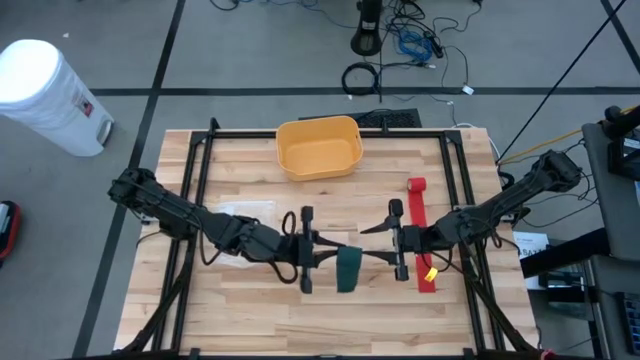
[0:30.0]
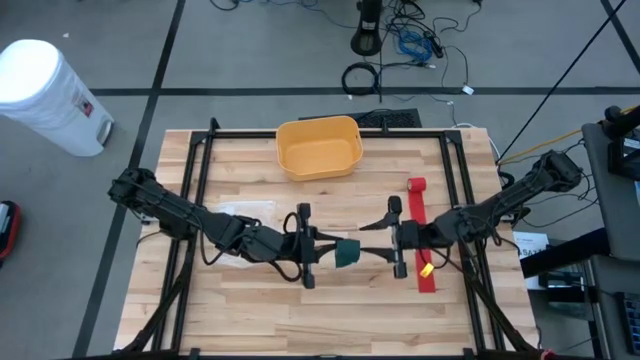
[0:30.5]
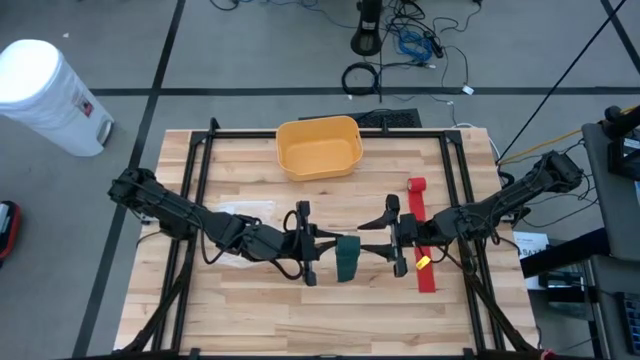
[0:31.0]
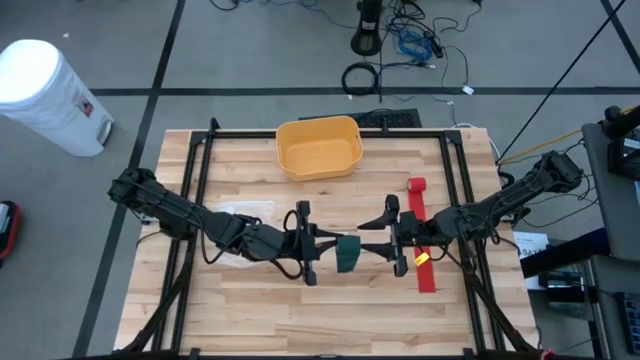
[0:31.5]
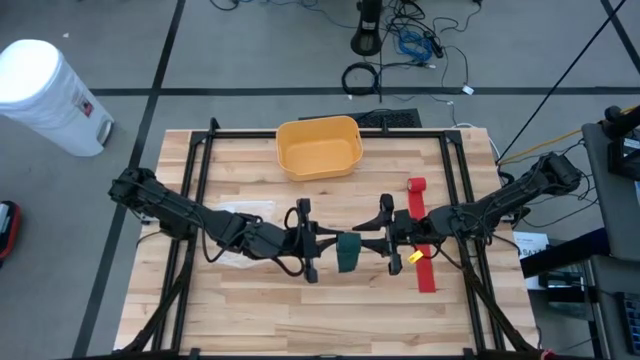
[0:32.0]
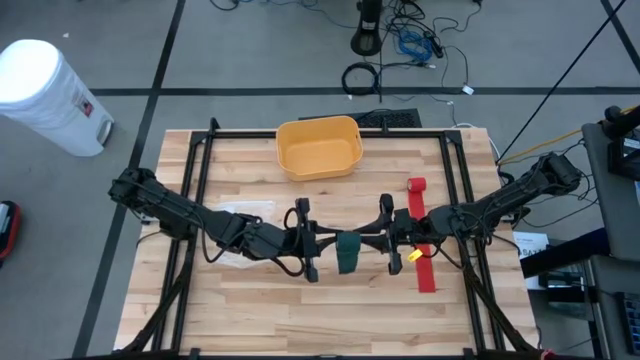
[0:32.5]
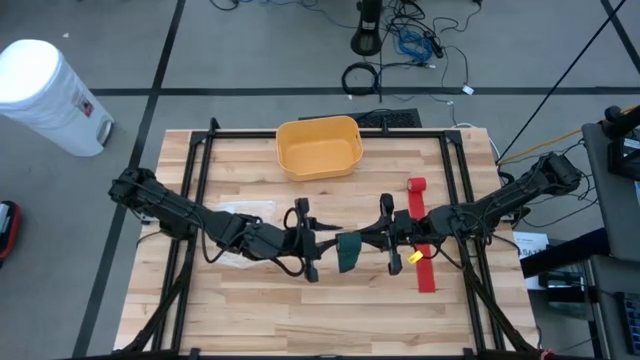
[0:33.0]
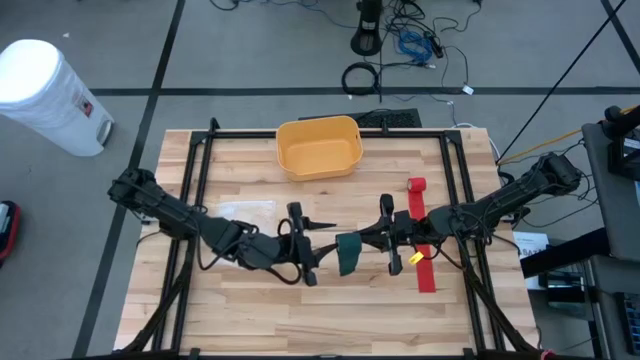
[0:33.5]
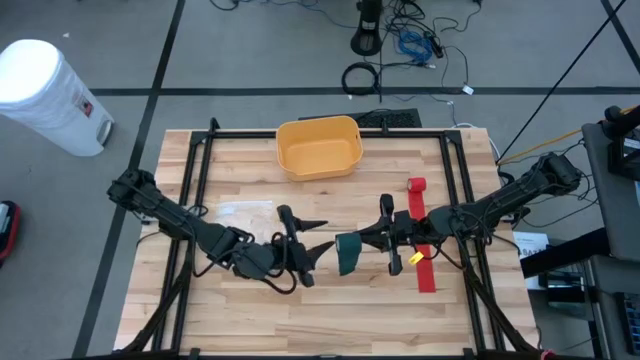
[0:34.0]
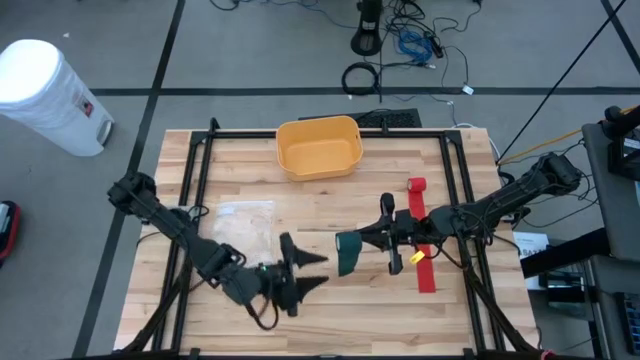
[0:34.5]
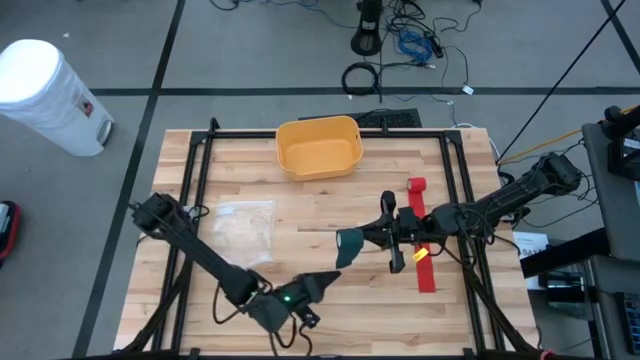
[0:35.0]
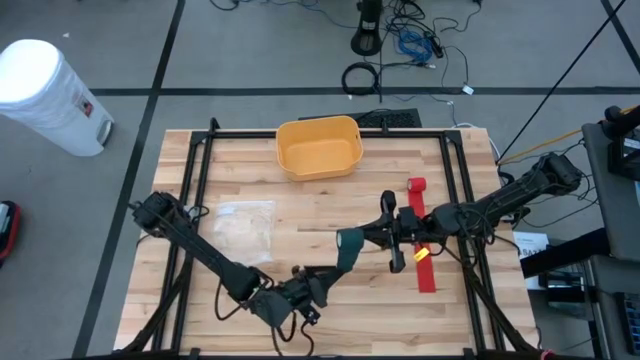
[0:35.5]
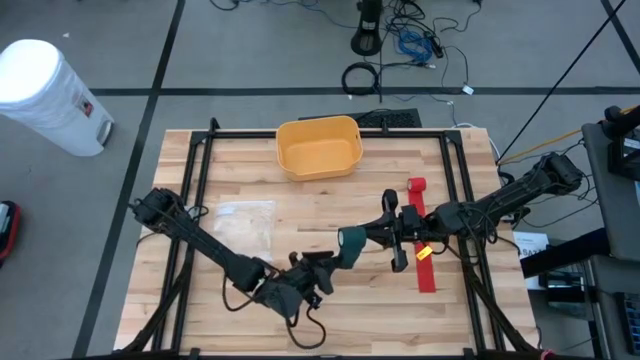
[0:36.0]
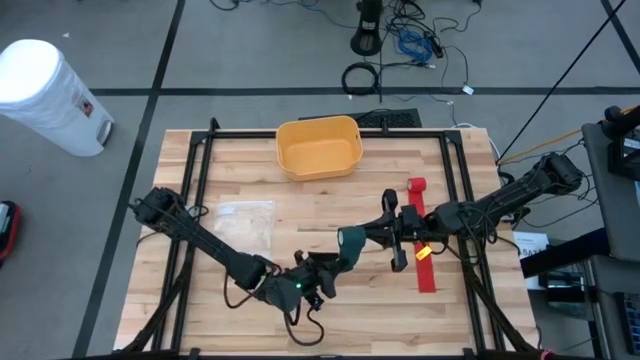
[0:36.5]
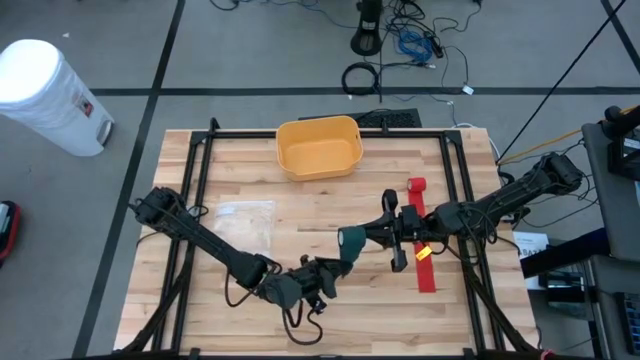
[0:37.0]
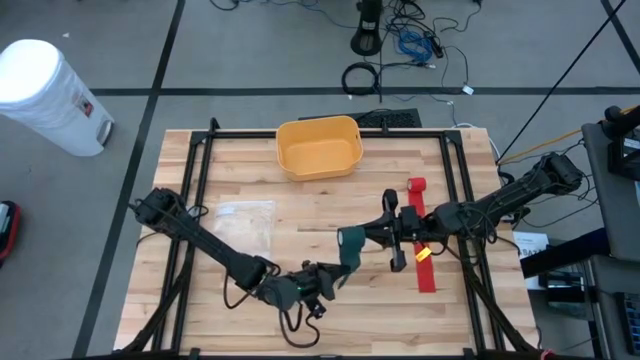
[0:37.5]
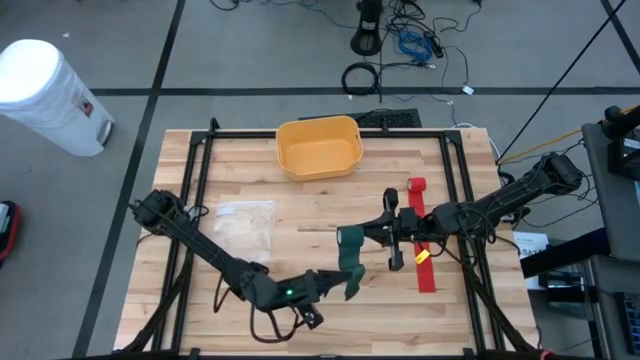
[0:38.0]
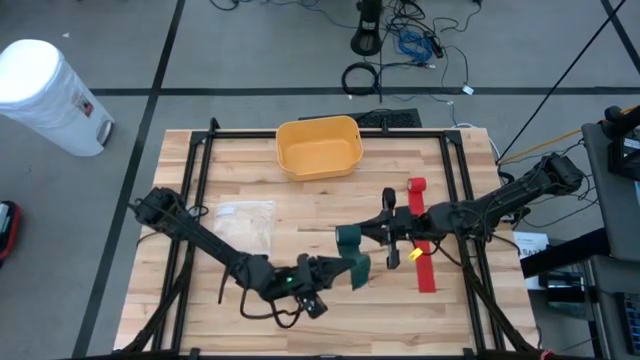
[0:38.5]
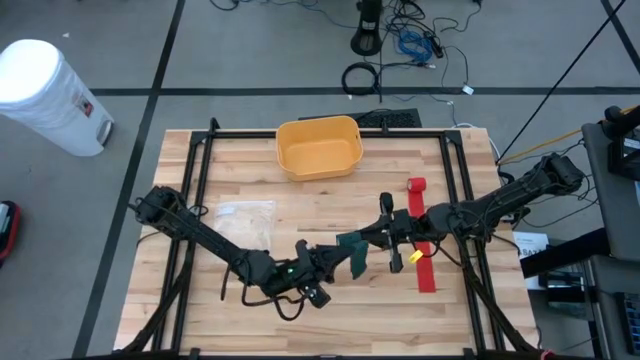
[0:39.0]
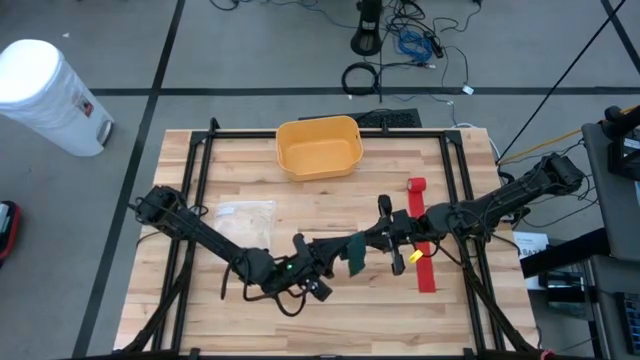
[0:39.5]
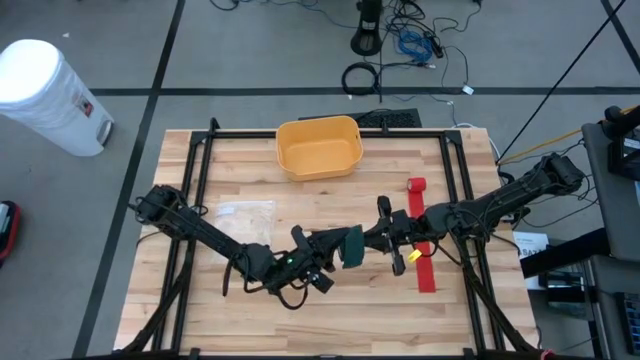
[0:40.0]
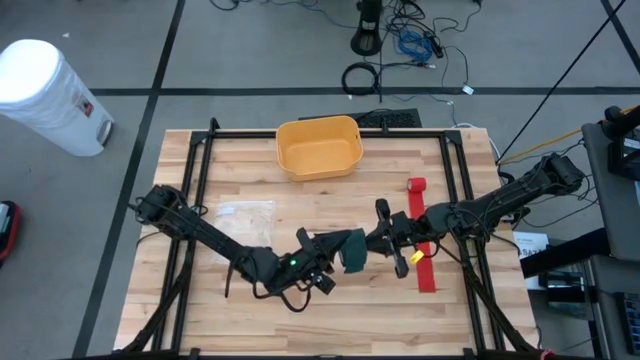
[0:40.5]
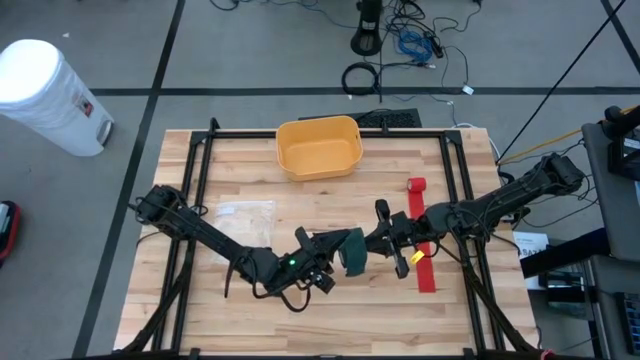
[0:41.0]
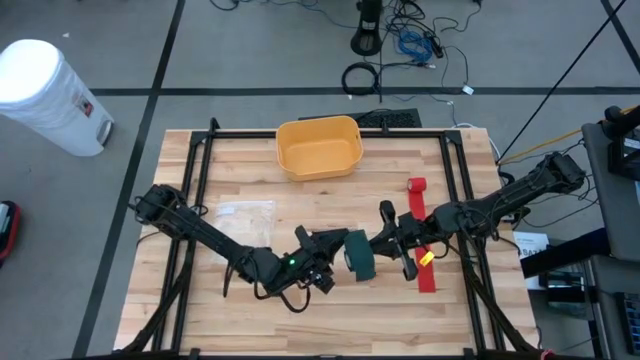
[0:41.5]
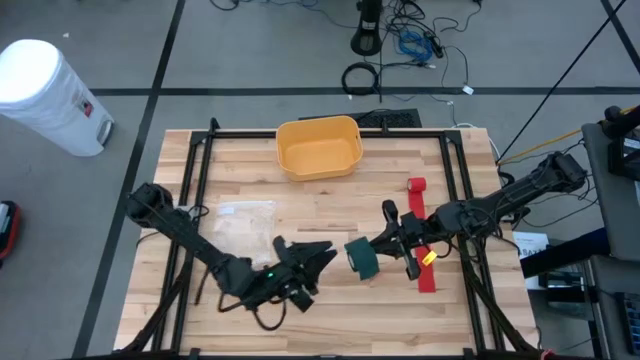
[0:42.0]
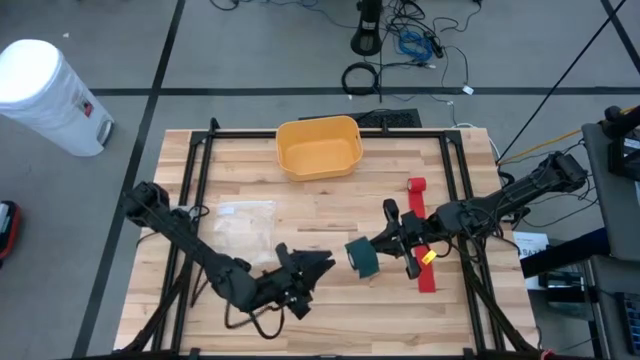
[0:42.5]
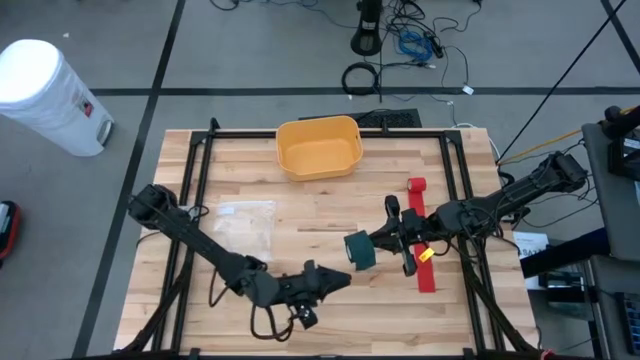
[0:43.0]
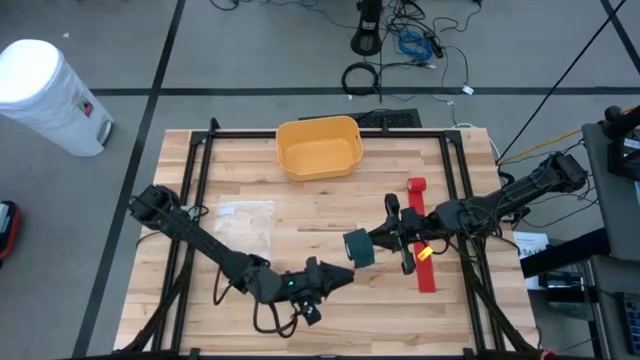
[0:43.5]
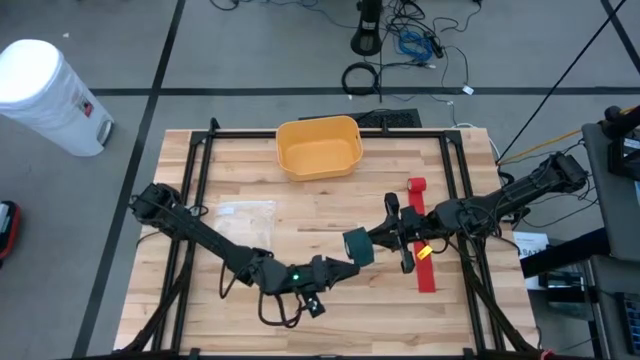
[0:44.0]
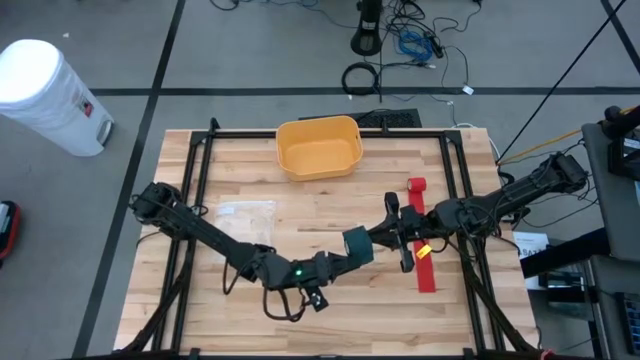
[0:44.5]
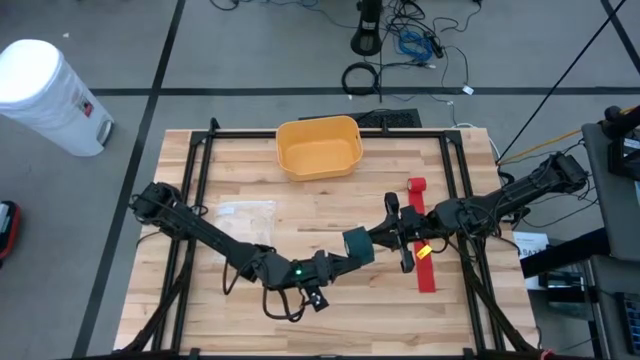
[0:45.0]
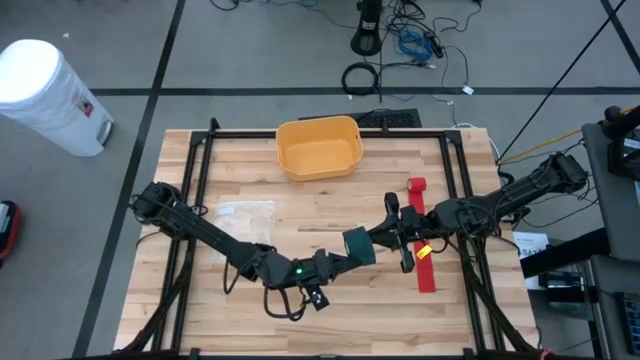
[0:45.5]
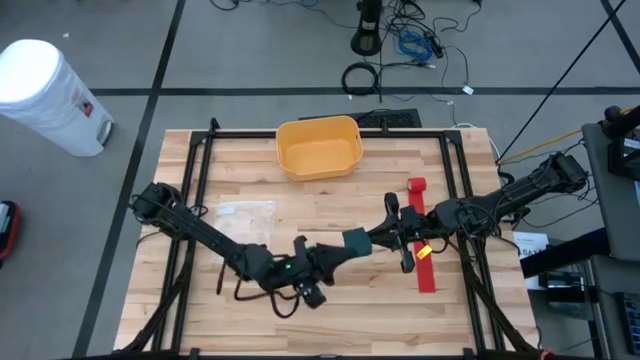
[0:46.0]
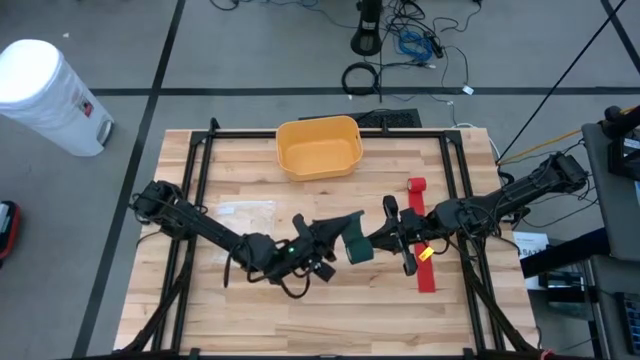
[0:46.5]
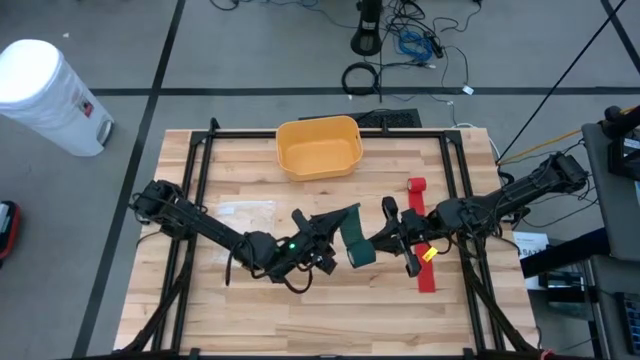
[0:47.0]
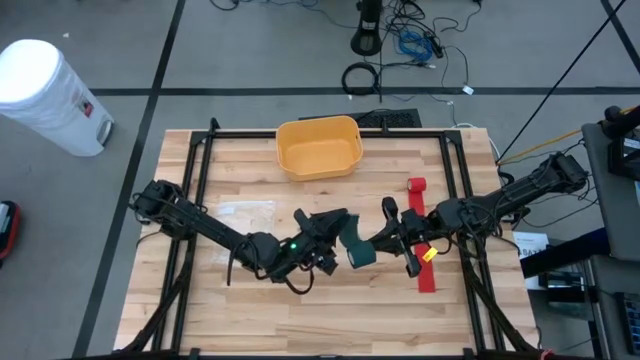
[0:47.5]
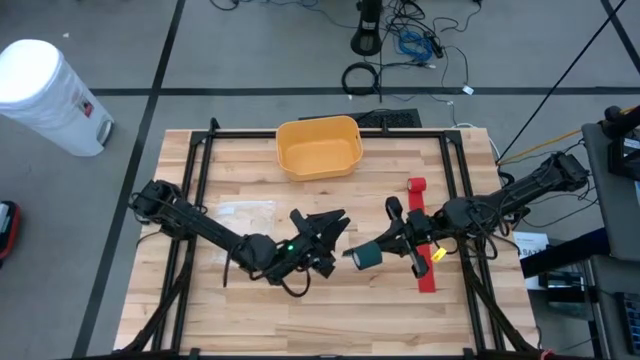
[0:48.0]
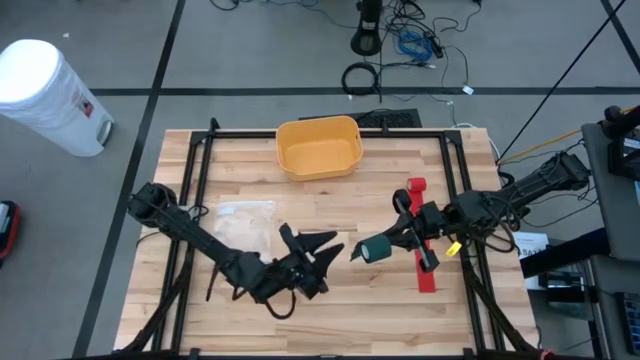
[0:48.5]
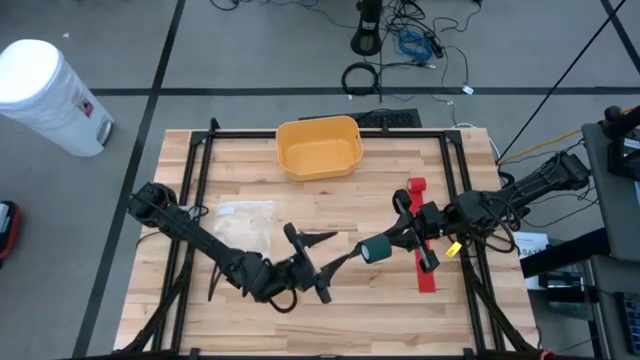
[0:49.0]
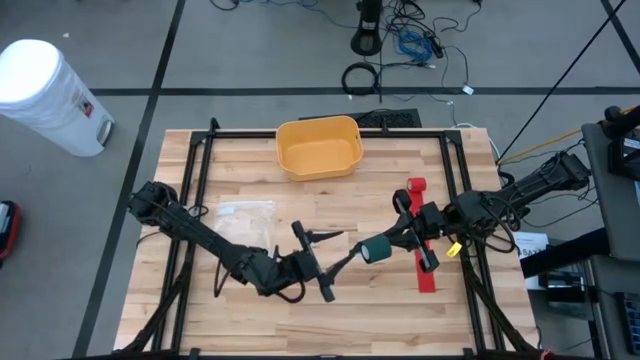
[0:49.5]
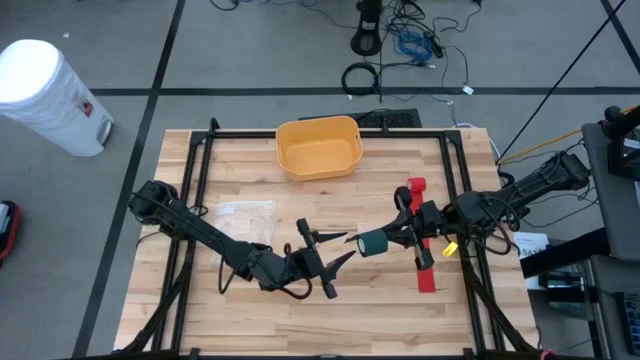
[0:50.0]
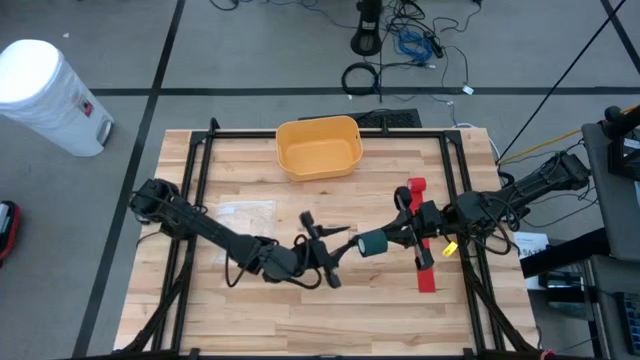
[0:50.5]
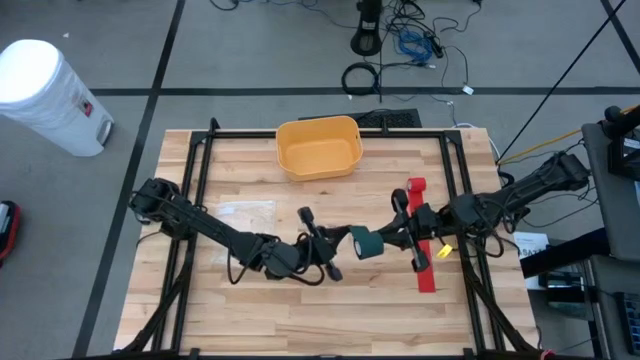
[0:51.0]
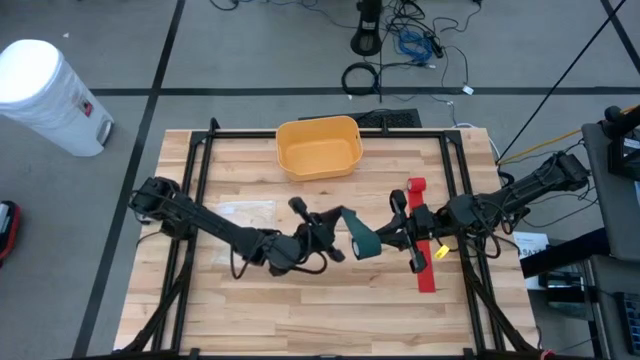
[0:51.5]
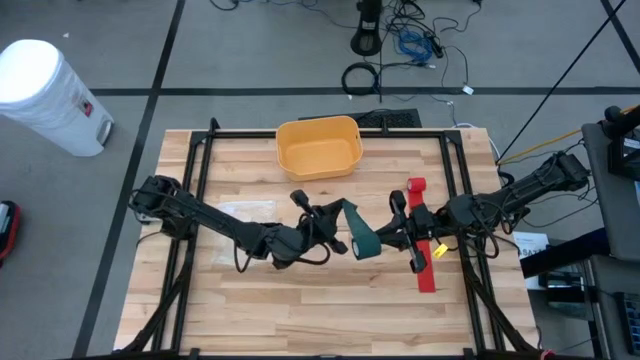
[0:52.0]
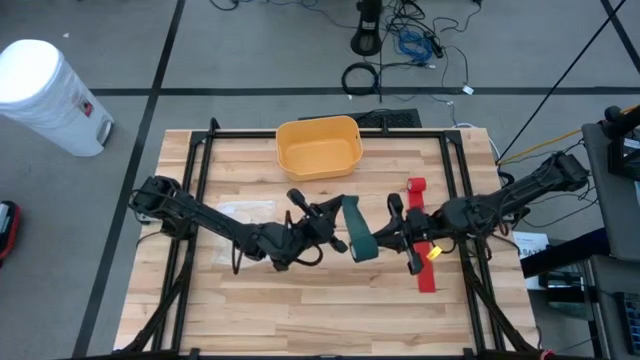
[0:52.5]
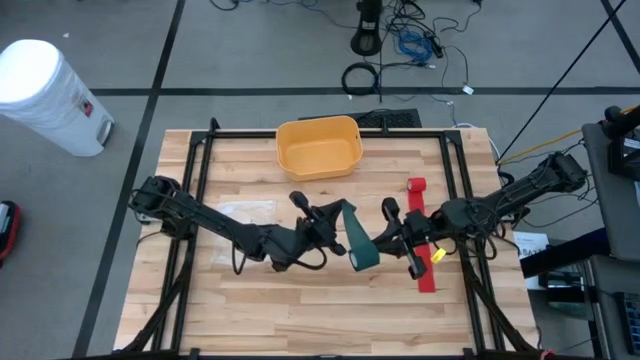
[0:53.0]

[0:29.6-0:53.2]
Task: Roll bandage
Roll the green bandage
